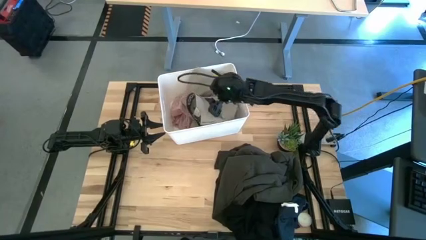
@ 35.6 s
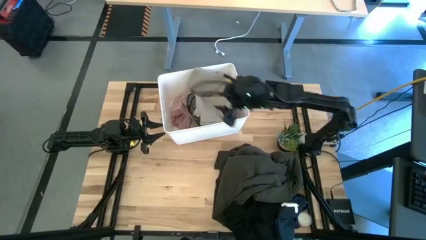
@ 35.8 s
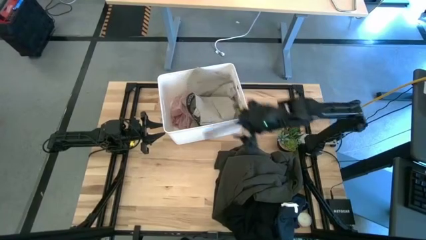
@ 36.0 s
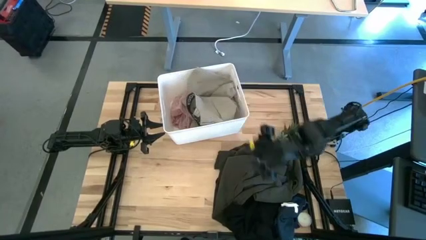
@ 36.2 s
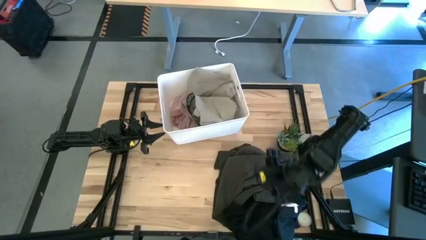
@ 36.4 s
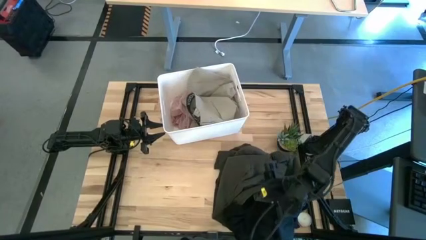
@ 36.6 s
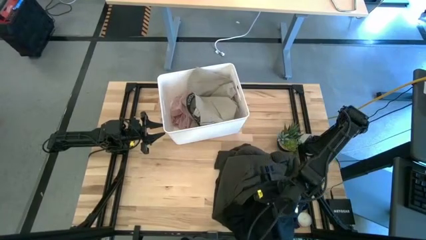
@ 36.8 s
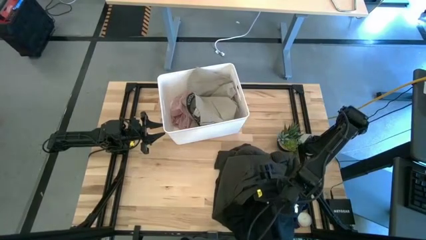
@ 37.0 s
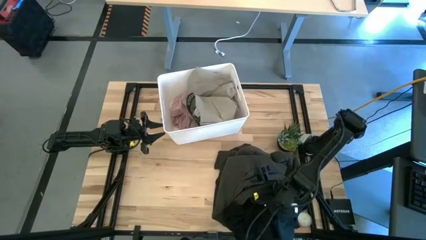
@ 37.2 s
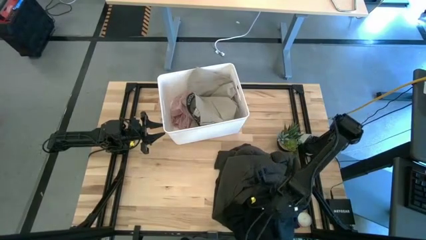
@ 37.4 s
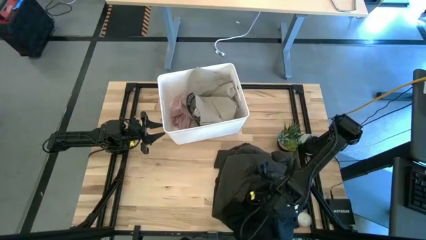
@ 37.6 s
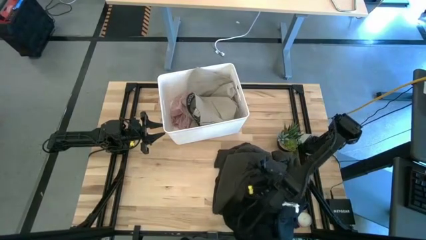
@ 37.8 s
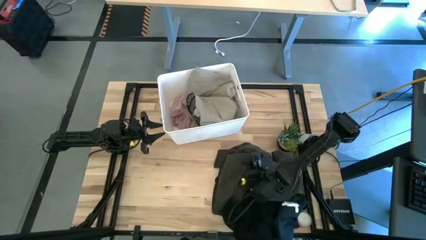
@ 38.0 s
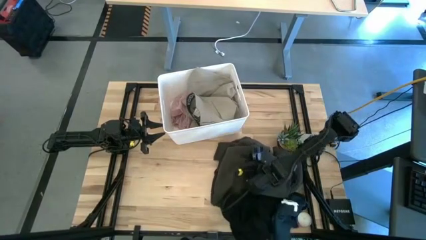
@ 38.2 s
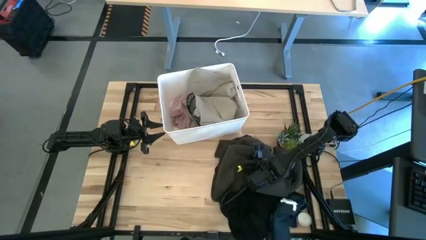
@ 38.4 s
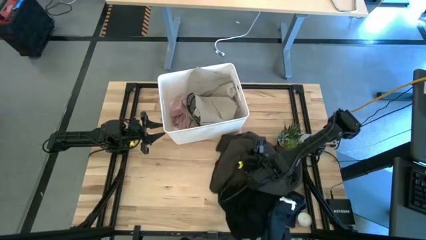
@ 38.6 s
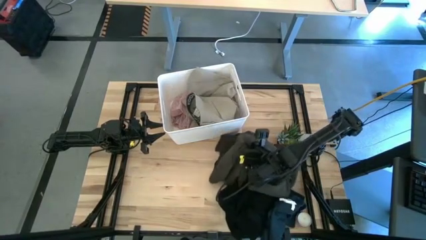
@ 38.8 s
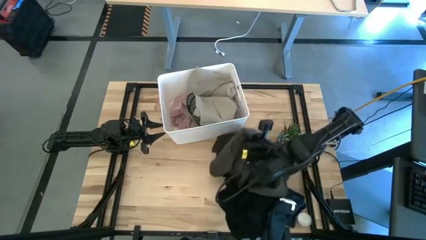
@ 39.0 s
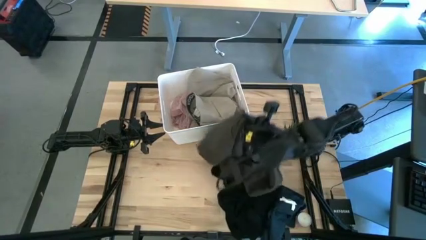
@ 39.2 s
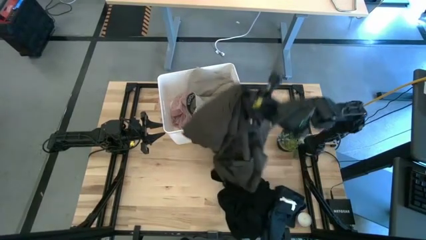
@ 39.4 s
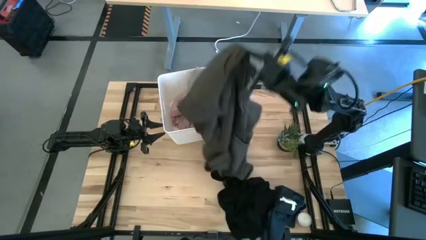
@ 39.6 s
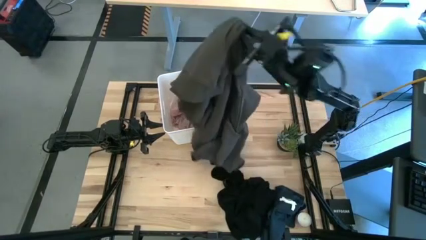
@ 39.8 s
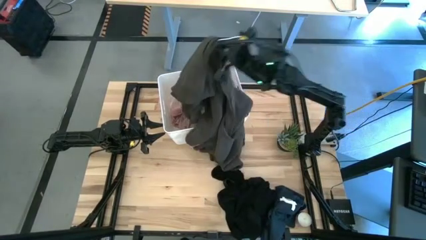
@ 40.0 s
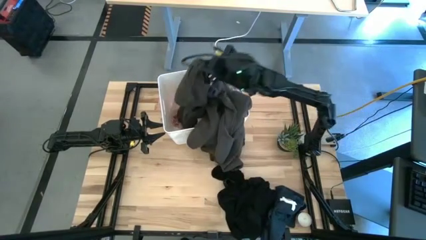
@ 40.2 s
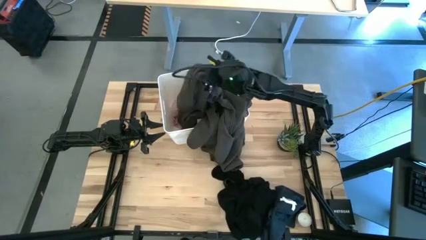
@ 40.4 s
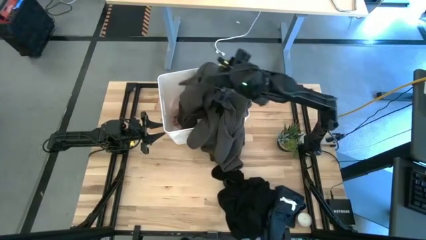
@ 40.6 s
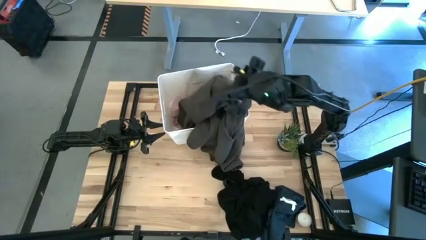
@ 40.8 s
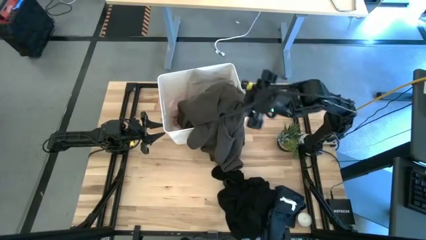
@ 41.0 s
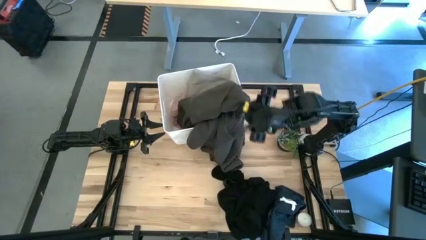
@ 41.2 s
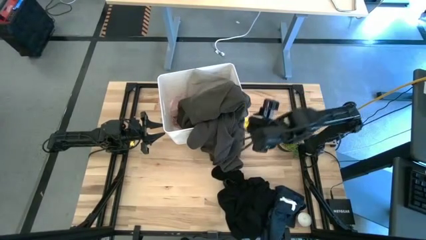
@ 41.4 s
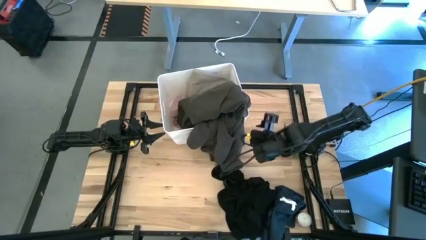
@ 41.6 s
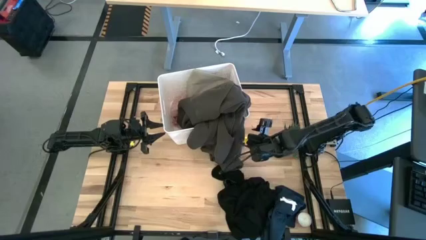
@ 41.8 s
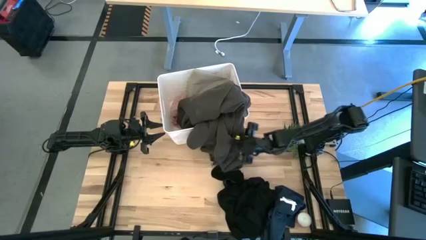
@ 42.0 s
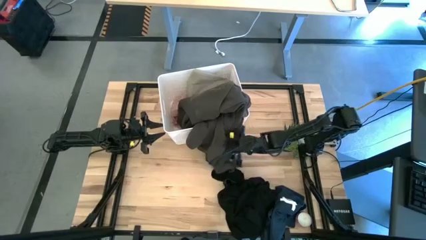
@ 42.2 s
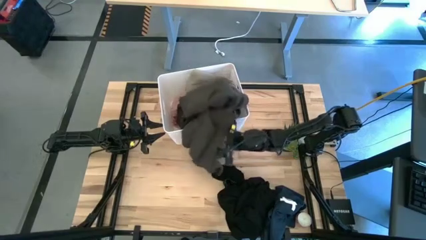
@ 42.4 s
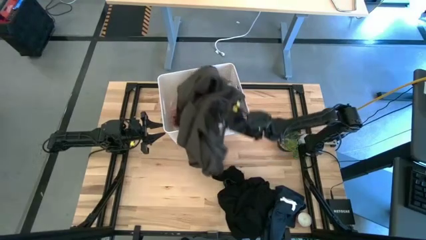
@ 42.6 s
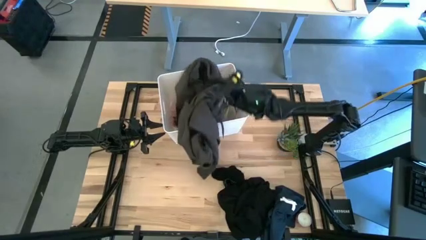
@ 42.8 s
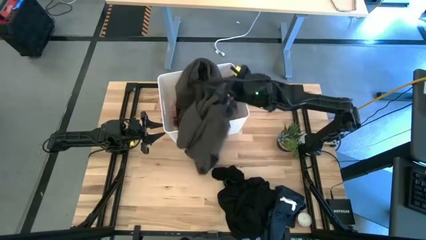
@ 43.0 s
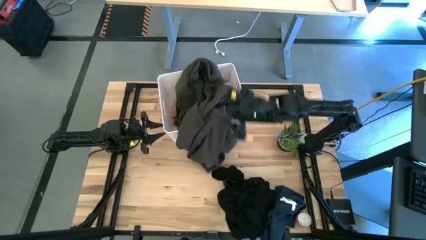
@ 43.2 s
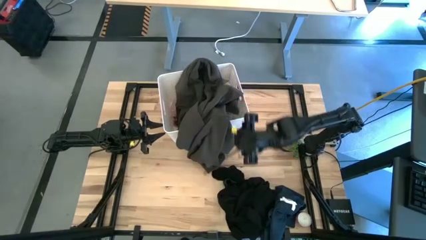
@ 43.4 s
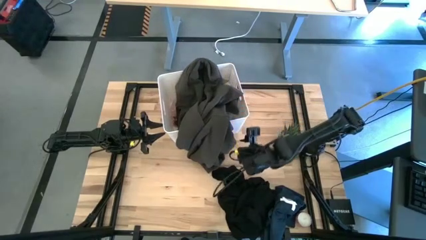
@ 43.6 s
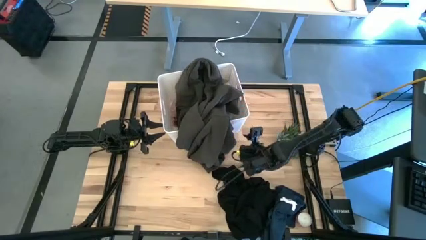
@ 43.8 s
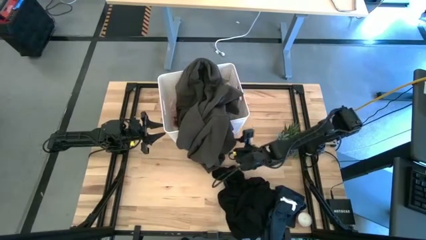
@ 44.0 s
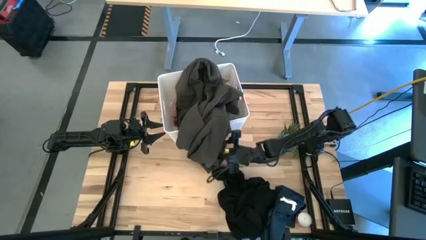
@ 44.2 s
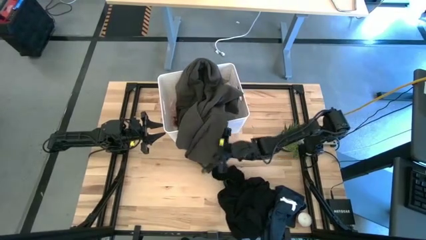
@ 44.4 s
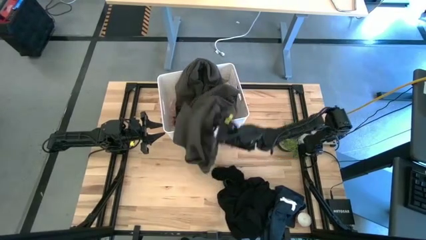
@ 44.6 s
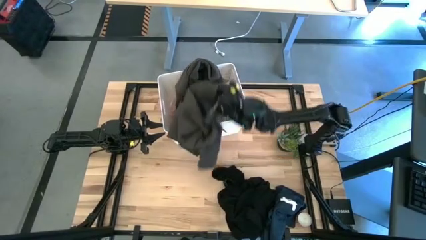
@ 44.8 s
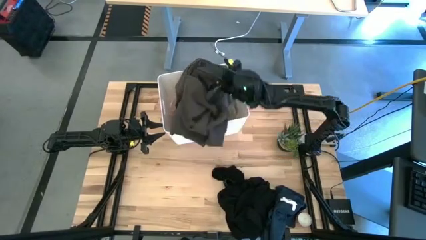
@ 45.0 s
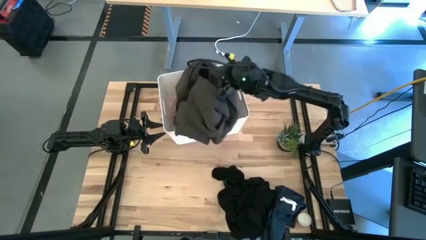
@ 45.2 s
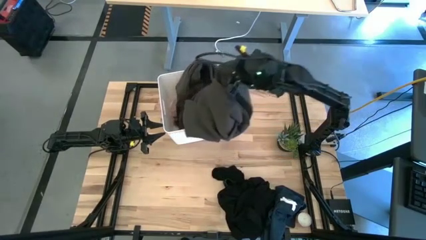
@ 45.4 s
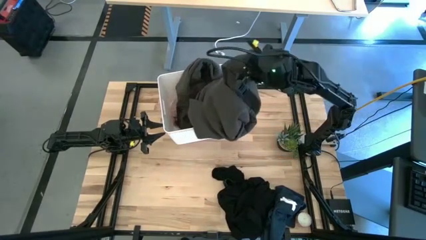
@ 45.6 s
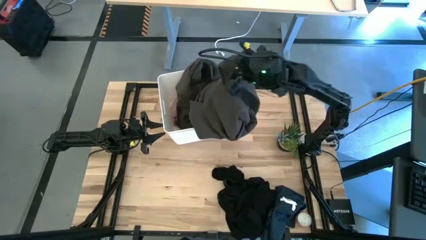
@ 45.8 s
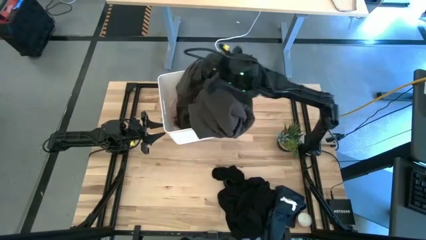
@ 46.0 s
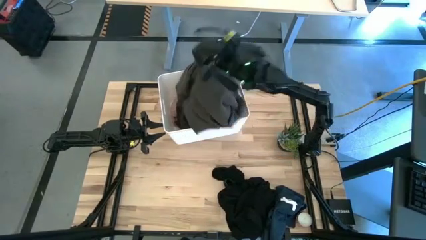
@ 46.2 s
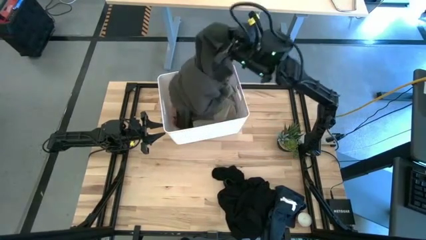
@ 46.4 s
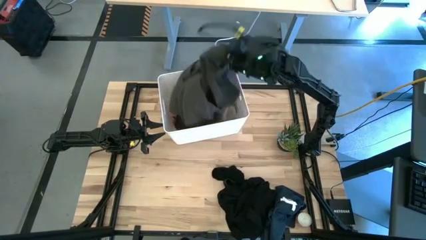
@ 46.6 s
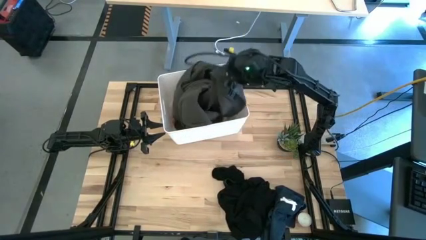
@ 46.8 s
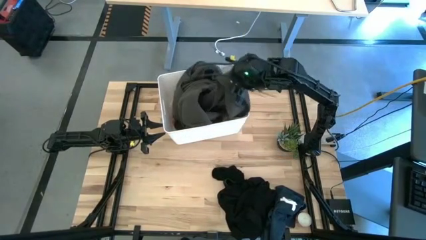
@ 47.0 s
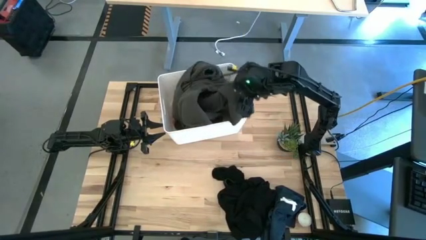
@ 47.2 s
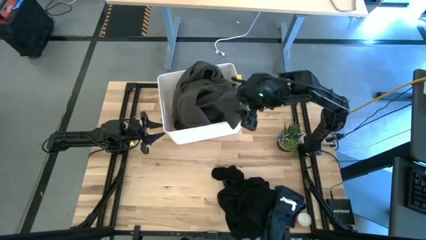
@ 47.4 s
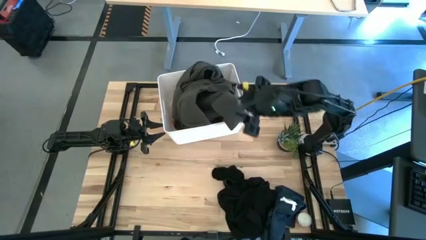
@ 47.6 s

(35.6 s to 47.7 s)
Task: Sort clothes
Put the black hoodie into the white laundry bin

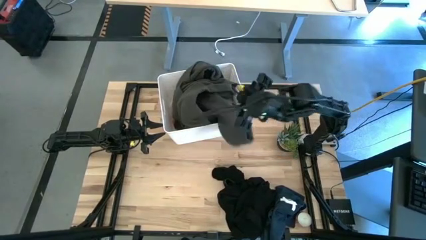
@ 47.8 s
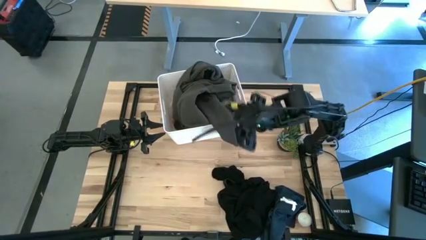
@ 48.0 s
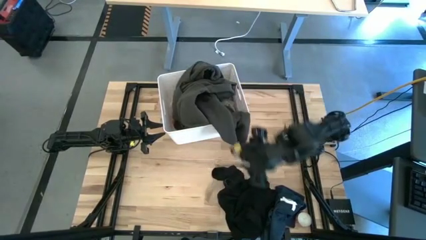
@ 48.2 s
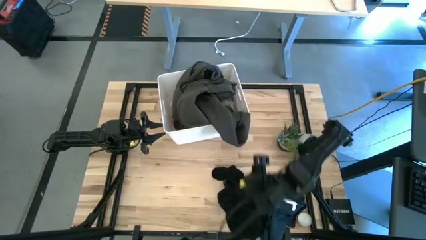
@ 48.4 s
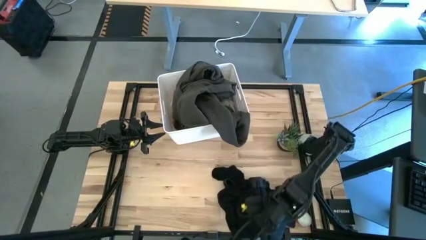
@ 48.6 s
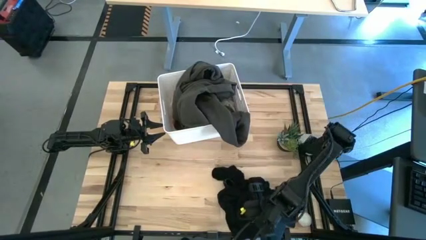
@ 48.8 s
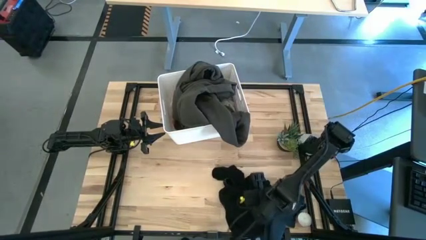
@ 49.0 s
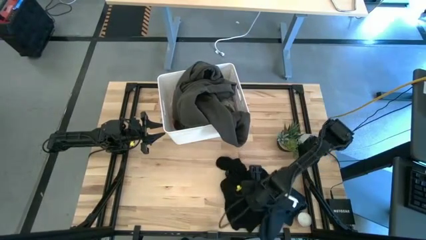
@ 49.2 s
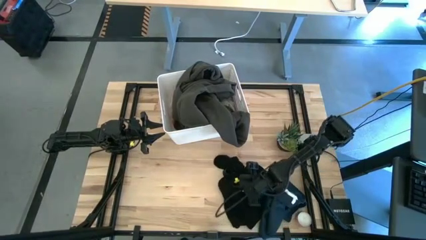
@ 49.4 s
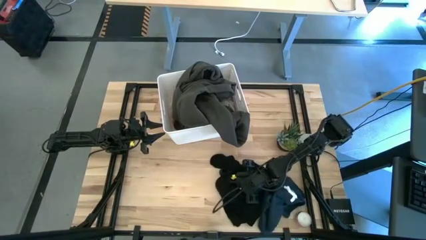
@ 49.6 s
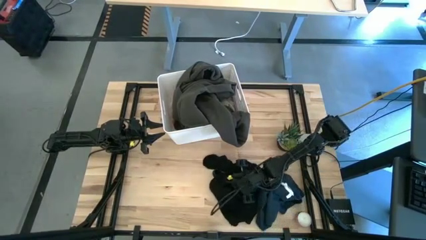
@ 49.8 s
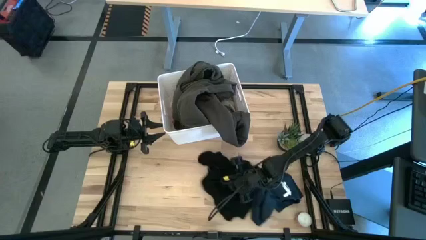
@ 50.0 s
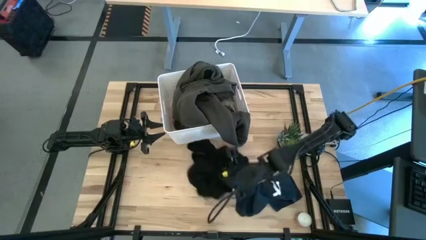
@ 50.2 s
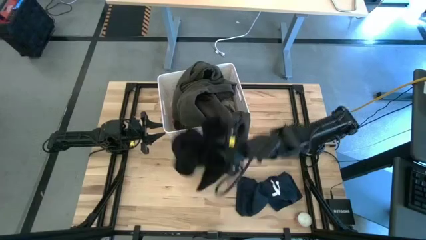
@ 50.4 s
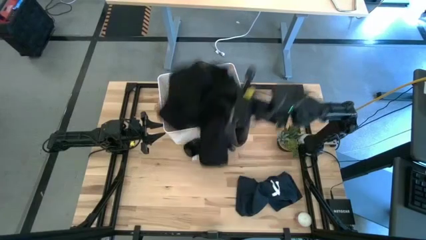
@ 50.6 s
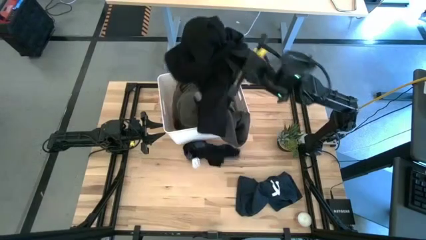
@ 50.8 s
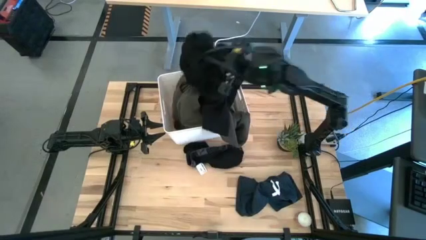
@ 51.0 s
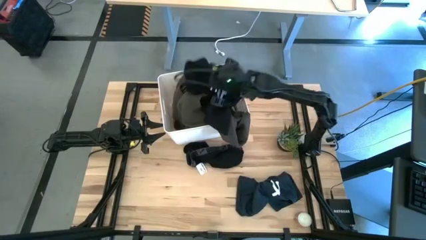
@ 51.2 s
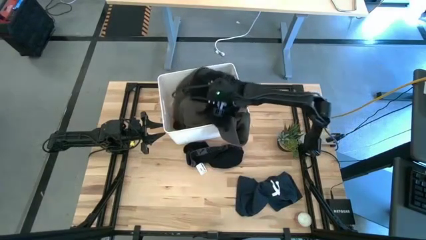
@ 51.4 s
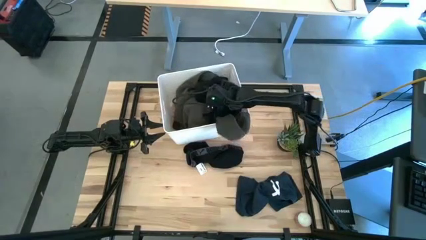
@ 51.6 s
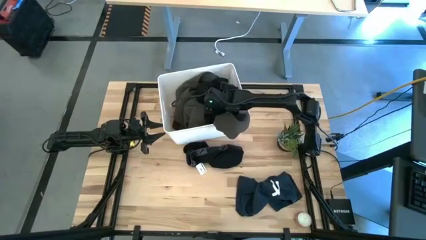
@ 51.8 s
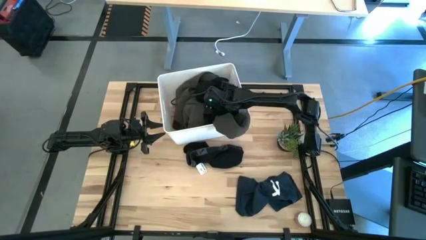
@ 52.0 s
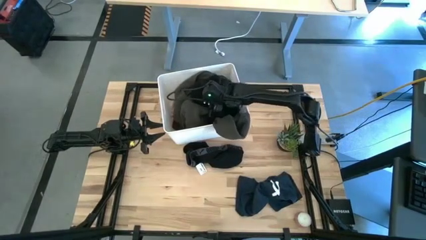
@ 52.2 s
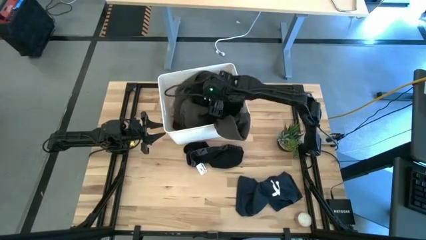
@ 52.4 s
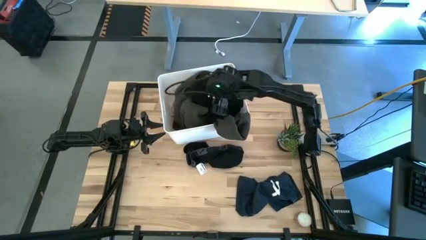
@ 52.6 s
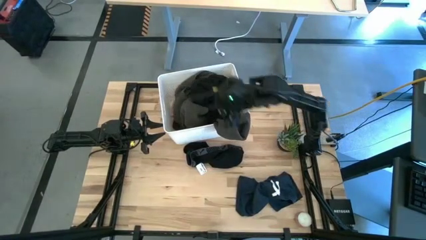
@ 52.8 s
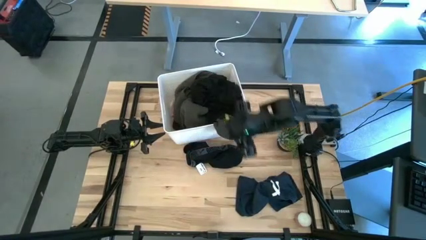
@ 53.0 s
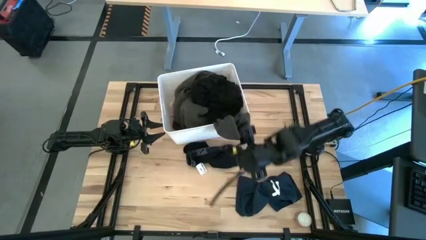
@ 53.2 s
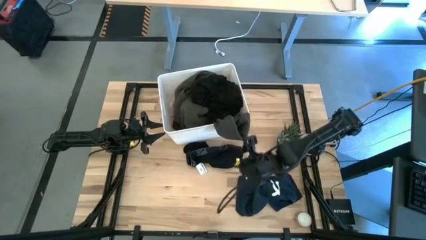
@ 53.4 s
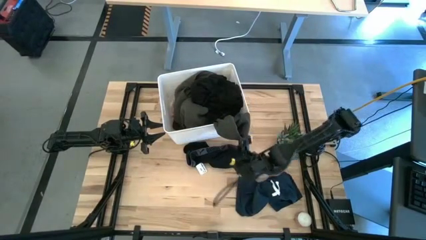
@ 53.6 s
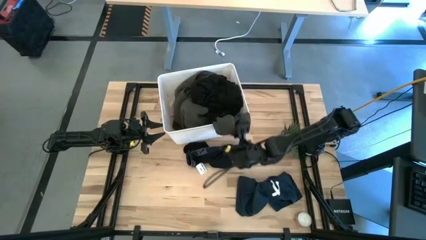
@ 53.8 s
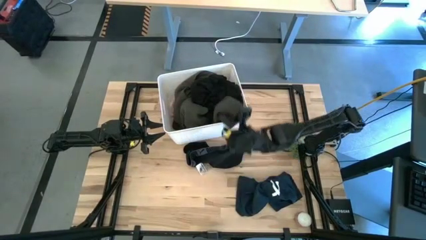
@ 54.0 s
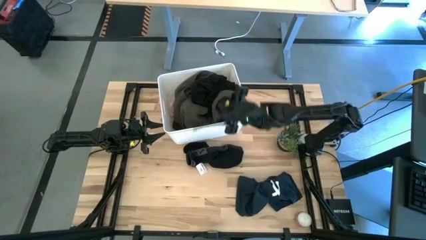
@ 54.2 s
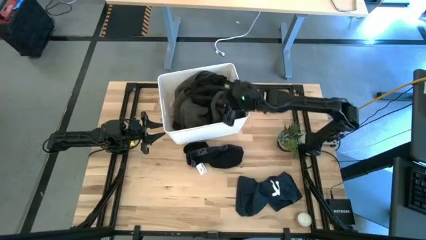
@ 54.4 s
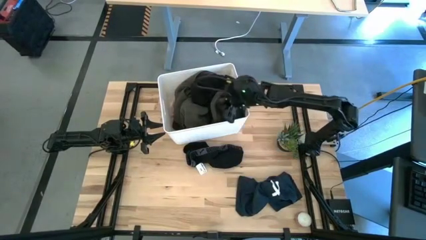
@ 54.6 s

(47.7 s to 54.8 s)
Put the black shirt into the white laundry bin
